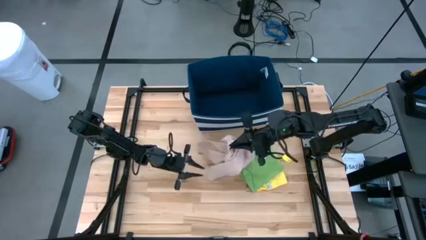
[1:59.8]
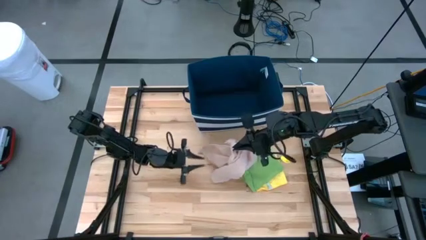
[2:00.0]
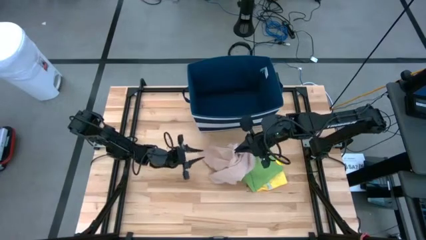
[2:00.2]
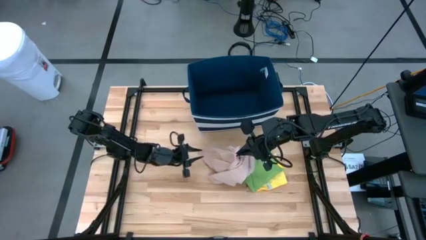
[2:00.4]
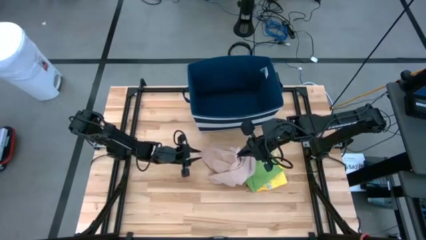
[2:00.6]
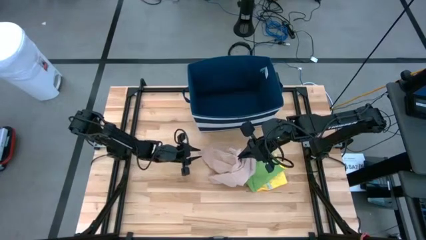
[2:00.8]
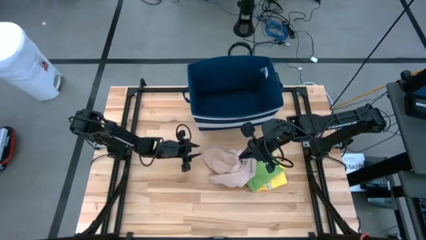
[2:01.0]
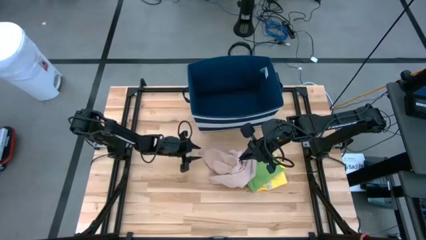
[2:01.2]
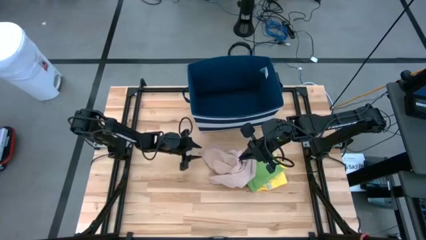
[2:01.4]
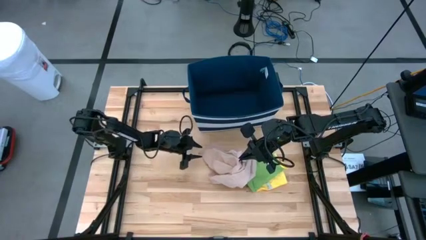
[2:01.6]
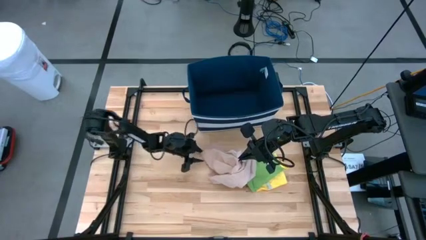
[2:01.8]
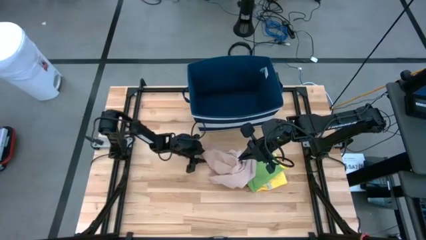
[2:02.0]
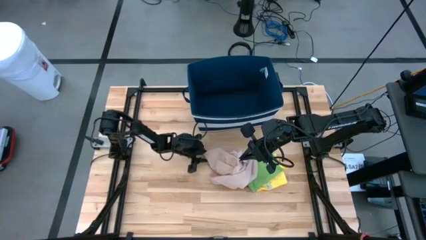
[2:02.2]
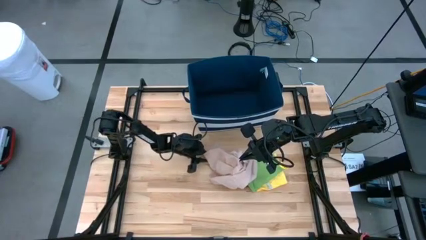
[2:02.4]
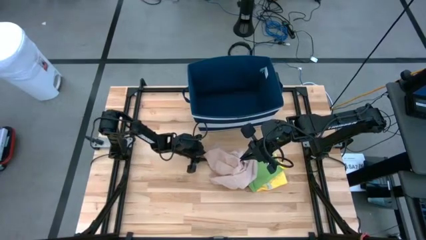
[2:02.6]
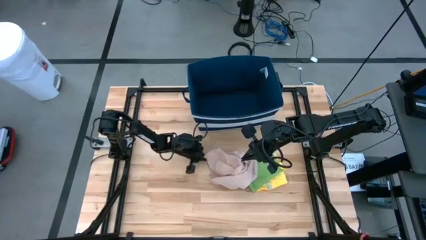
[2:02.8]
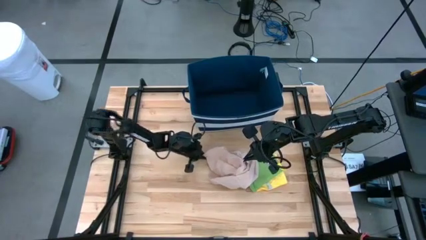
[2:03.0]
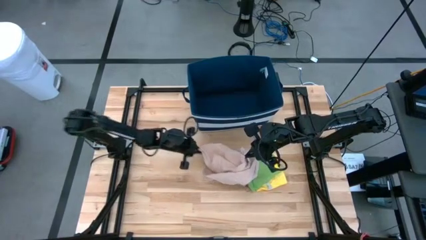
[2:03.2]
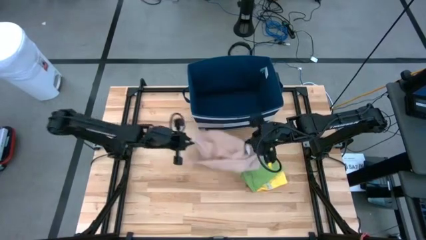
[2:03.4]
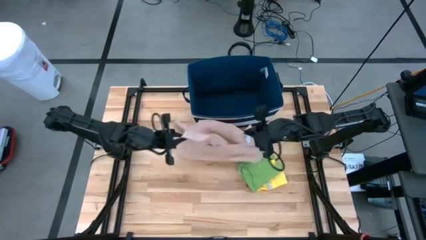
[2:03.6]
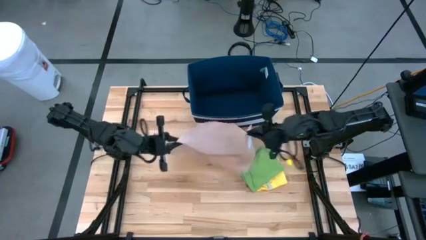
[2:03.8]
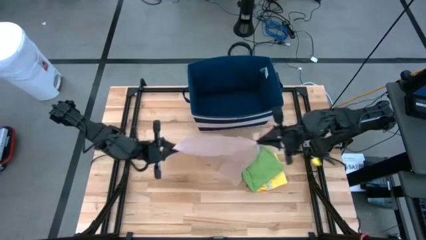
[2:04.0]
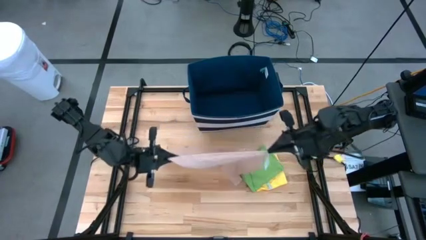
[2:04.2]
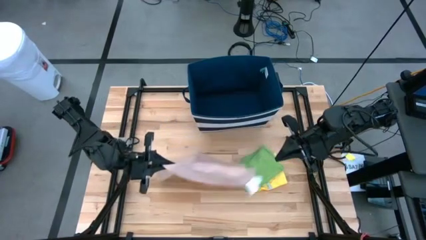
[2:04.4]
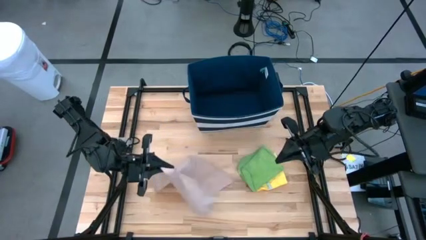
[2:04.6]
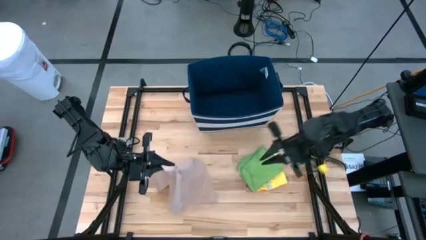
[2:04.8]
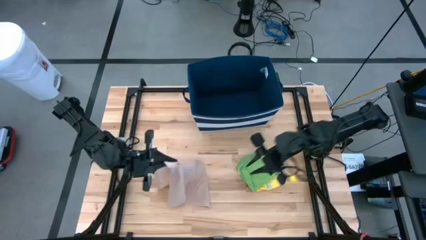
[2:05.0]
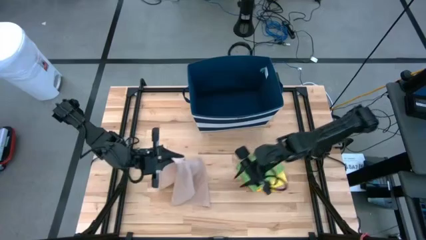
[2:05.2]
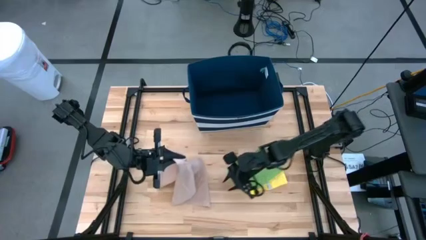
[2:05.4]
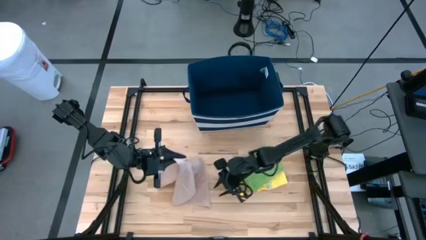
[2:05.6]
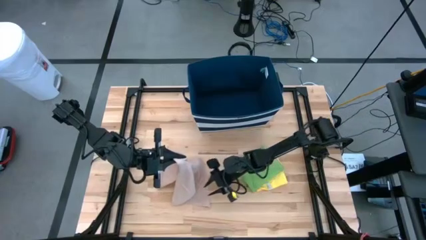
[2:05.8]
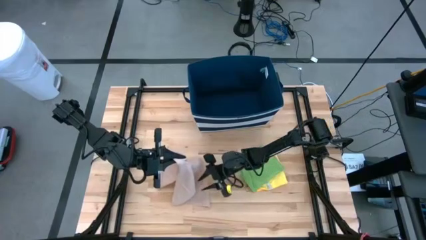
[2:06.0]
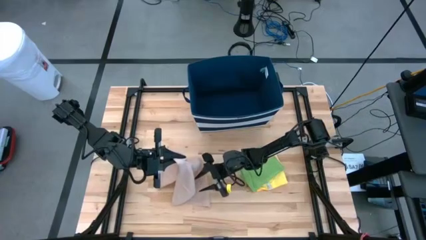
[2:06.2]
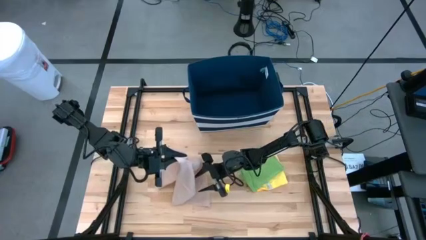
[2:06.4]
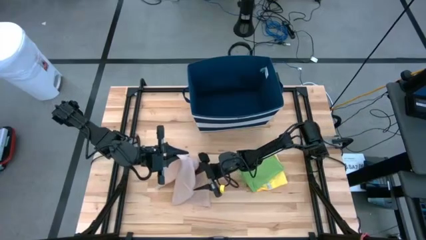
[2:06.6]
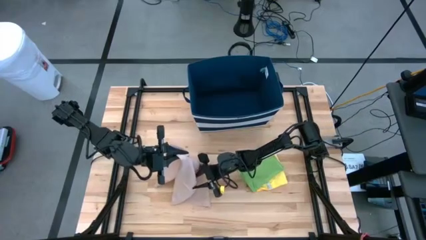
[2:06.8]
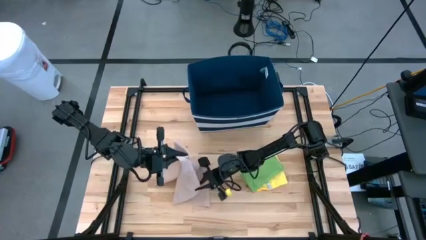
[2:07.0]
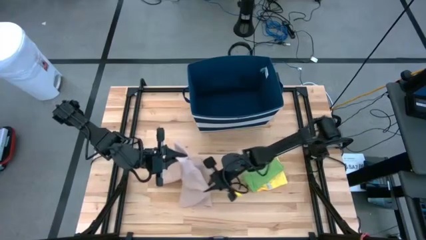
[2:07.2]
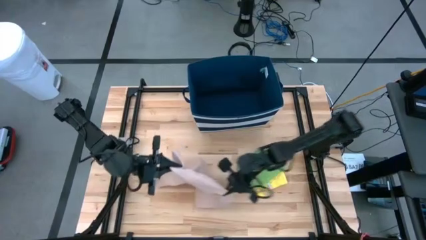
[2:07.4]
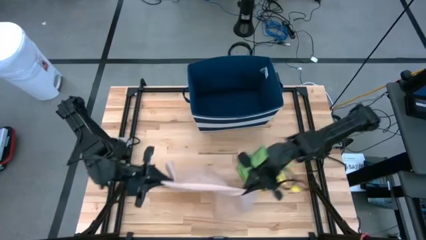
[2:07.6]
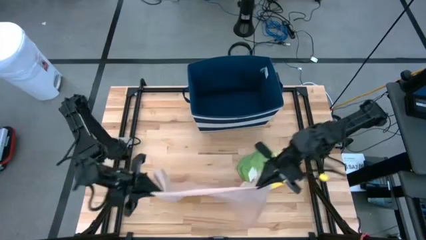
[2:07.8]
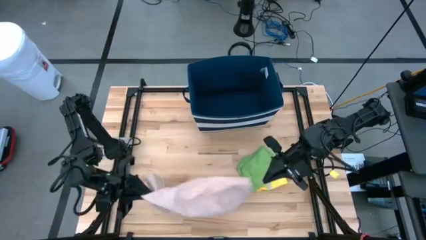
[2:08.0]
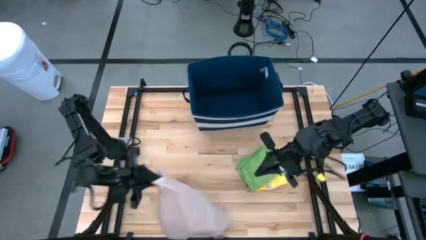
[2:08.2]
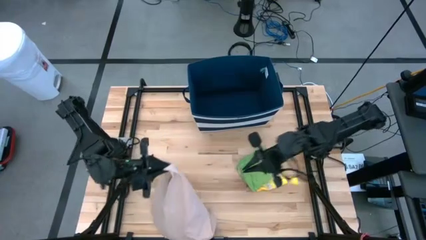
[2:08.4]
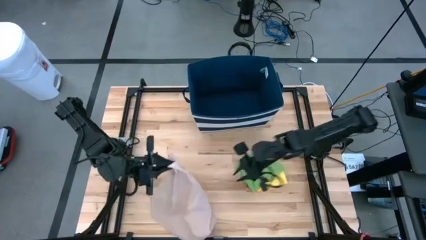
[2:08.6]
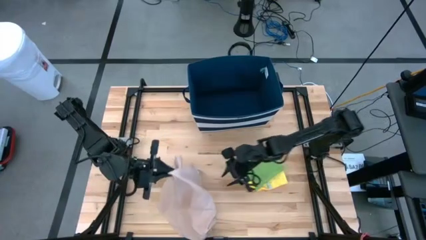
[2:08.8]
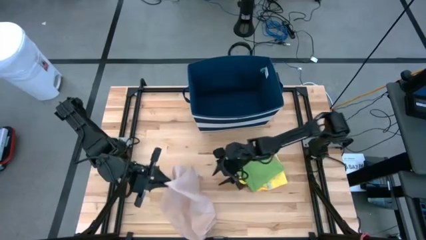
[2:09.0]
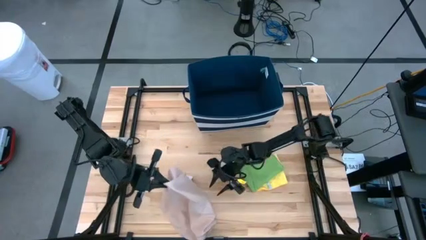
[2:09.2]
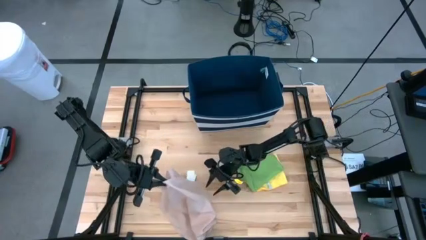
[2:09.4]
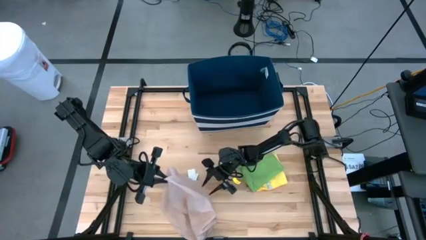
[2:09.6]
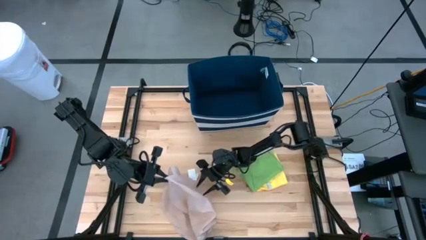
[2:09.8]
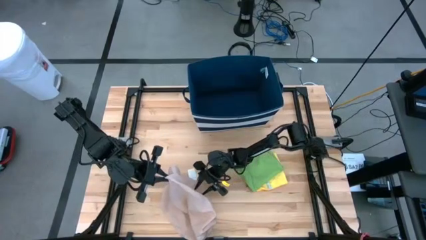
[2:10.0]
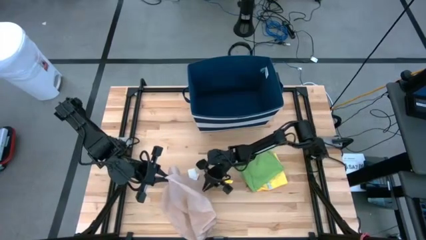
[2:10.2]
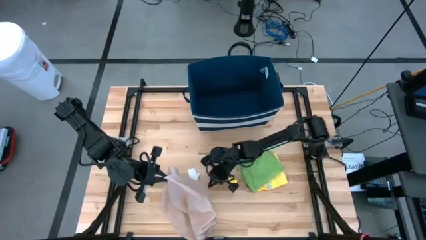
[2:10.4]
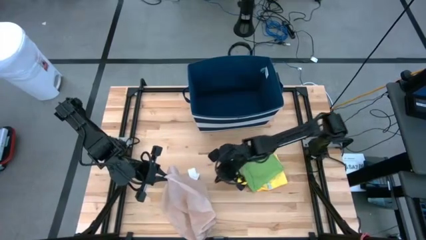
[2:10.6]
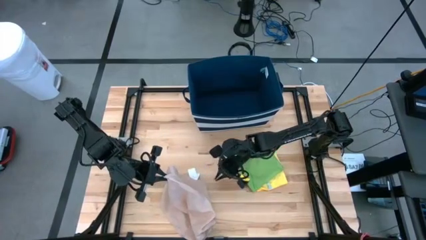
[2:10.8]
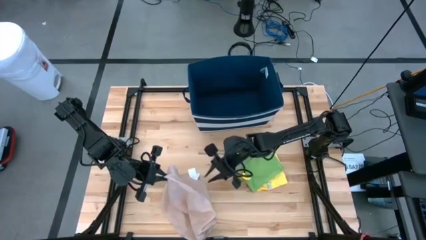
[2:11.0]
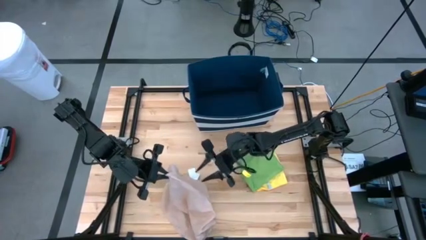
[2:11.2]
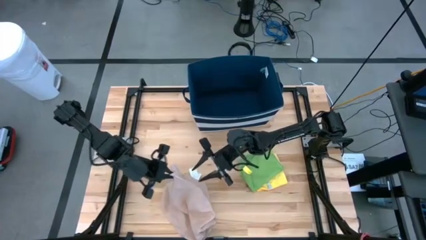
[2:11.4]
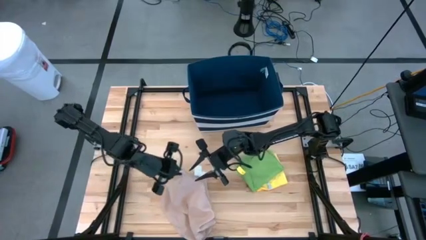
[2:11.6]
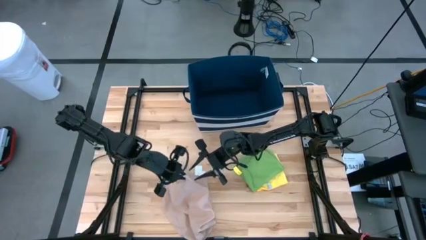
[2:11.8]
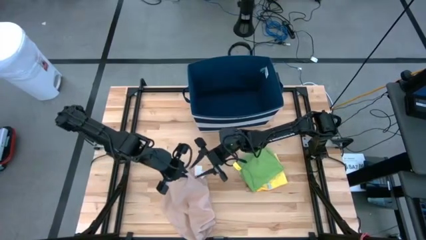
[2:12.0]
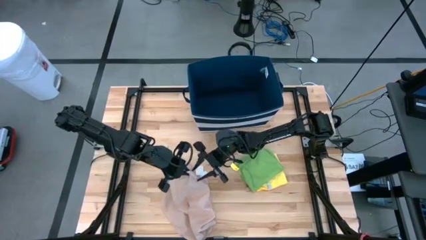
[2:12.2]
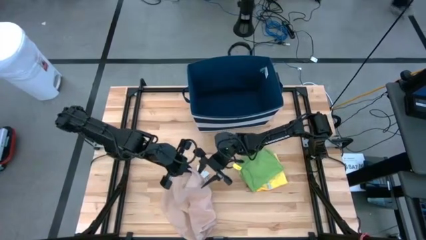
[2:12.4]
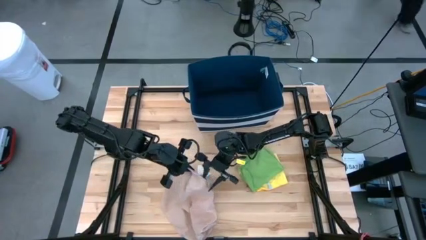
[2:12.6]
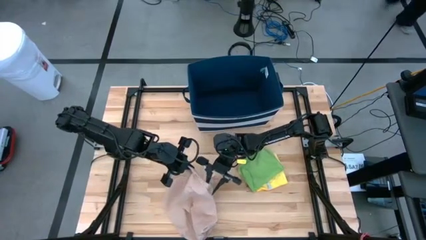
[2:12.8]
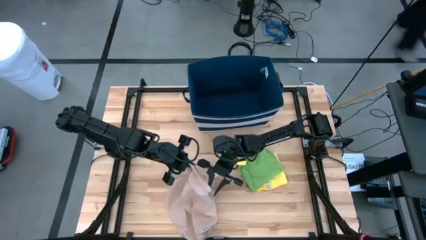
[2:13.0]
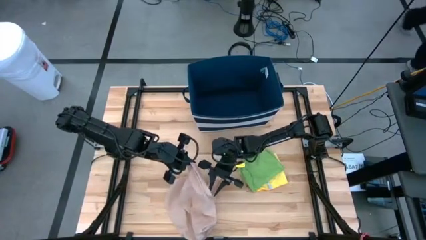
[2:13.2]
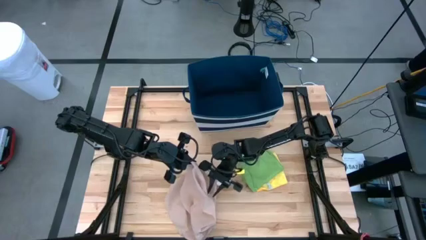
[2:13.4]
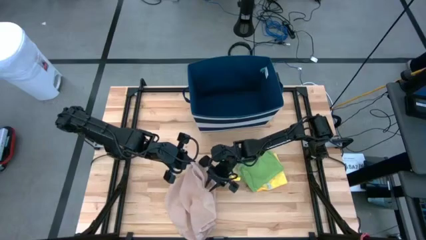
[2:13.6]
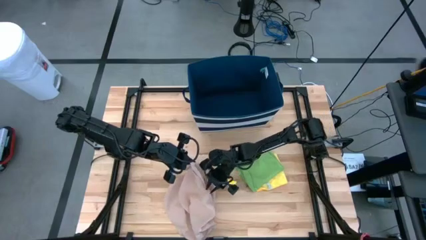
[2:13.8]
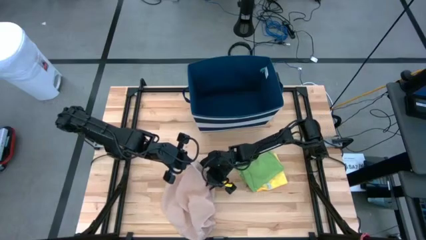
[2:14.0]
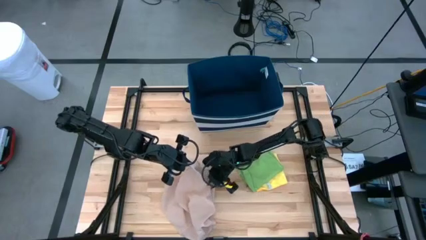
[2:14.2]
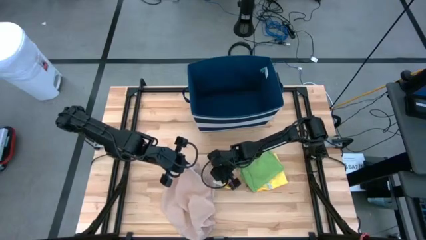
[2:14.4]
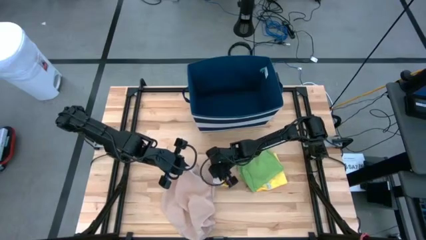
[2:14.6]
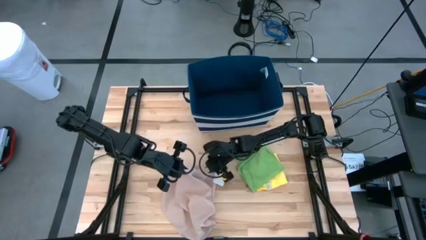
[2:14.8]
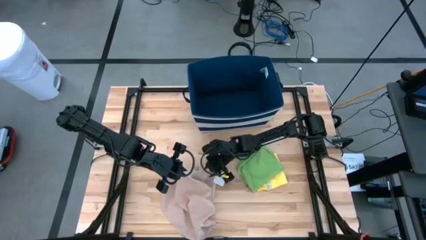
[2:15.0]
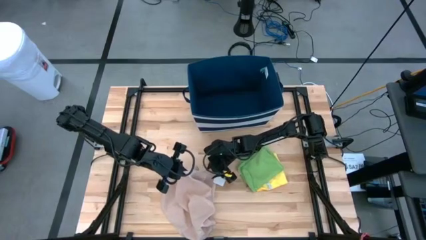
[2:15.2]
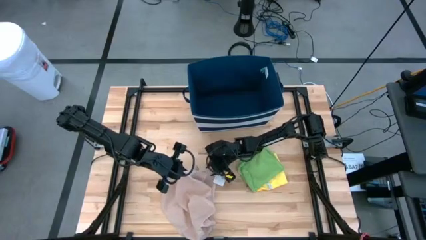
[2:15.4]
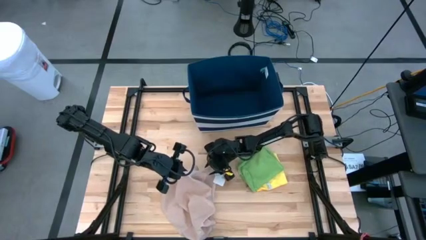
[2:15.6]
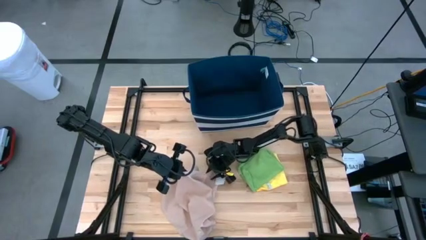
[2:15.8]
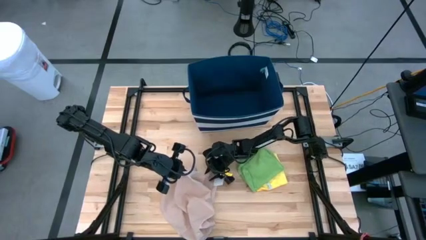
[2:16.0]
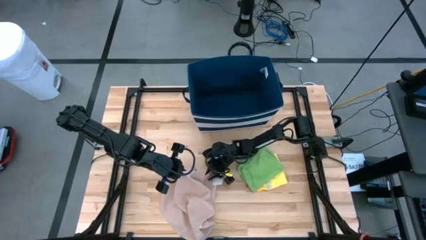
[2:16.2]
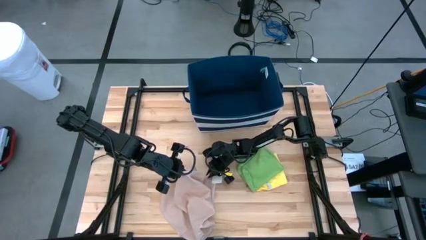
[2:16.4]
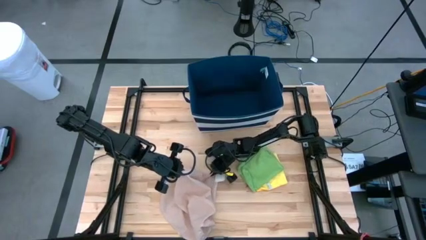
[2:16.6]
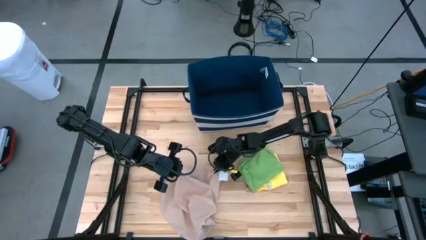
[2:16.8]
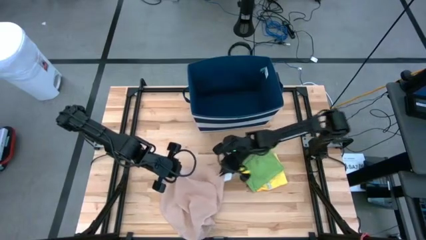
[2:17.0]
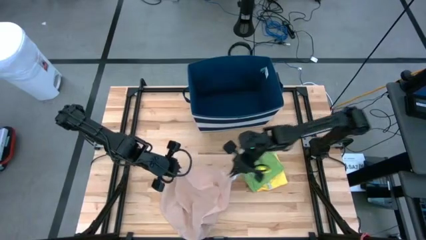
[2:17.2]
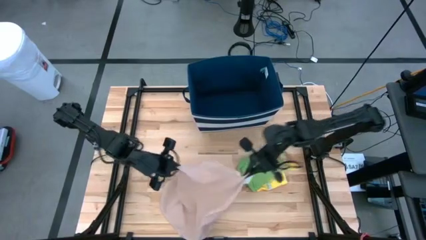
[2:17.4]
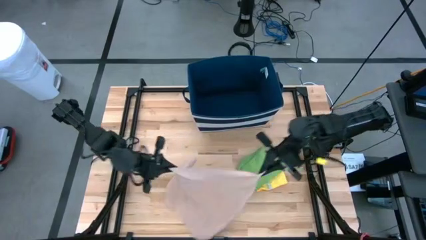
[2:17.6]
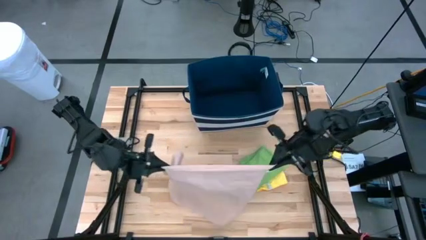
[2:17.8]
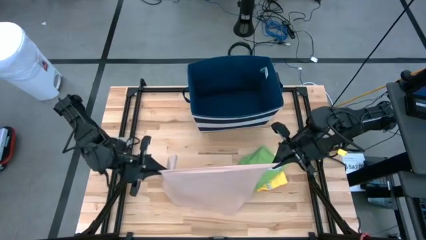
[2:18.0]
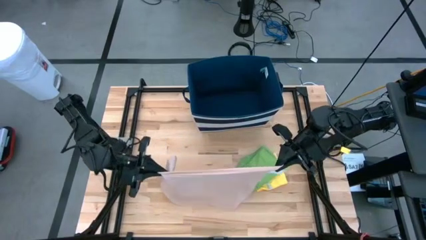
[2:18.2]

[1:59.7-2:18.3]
Task: Fold towel
Fold the light brown towel
